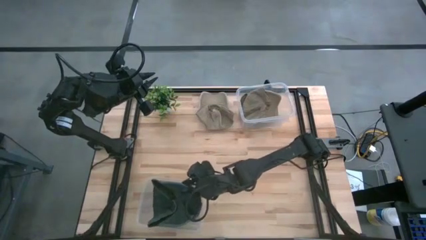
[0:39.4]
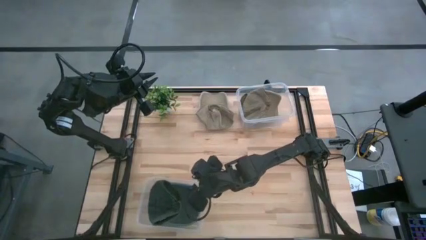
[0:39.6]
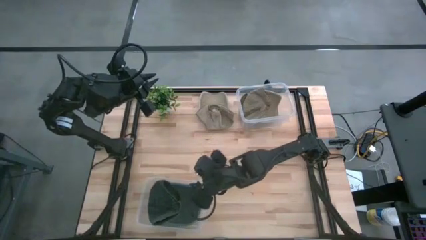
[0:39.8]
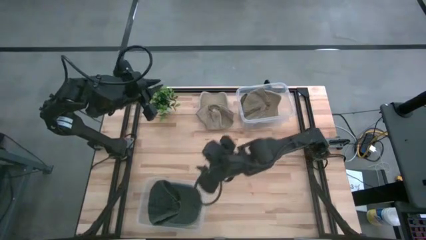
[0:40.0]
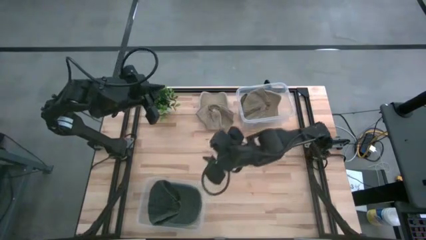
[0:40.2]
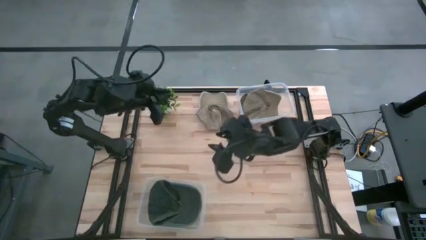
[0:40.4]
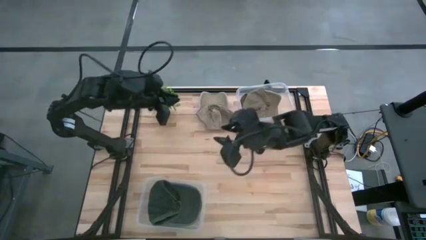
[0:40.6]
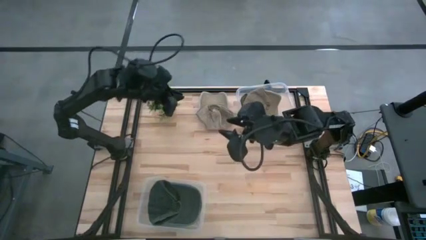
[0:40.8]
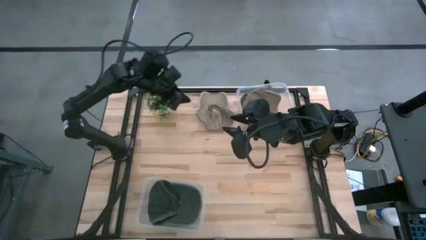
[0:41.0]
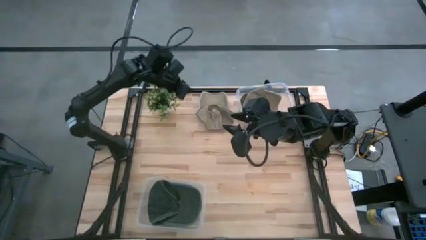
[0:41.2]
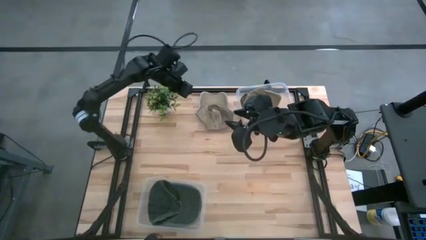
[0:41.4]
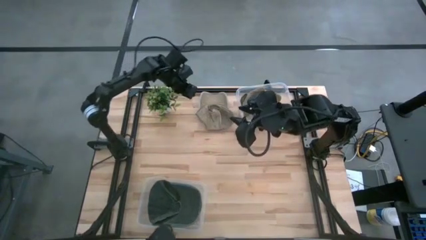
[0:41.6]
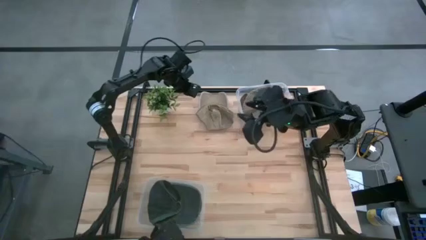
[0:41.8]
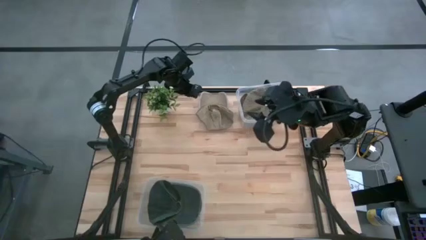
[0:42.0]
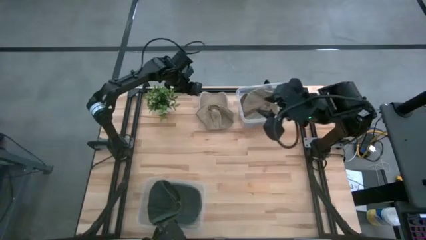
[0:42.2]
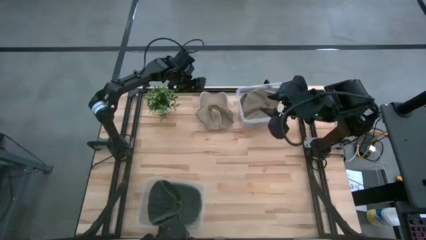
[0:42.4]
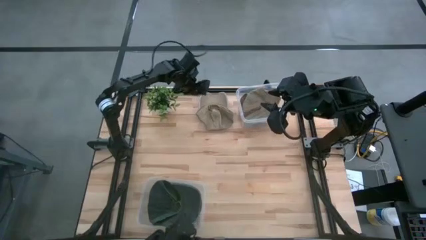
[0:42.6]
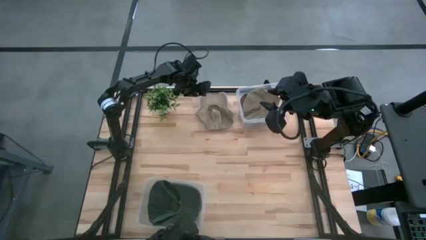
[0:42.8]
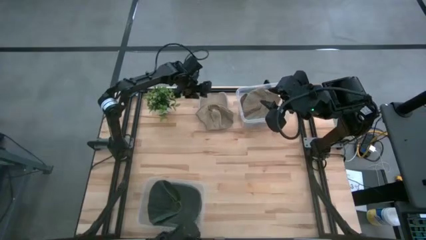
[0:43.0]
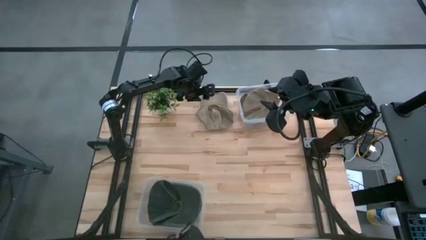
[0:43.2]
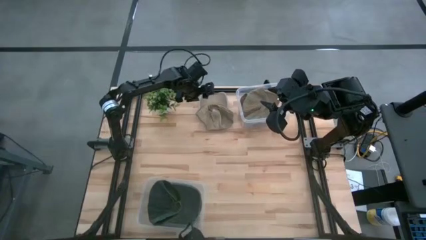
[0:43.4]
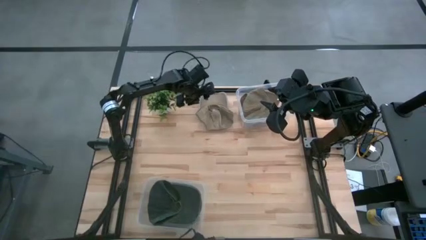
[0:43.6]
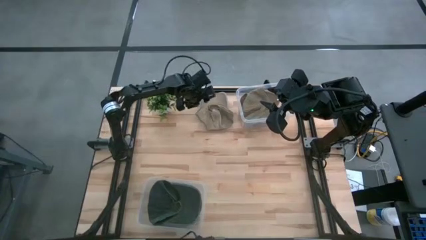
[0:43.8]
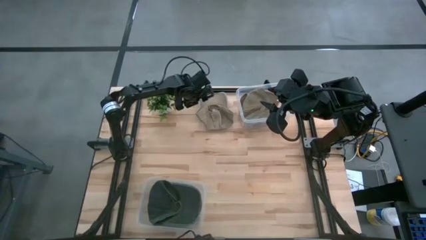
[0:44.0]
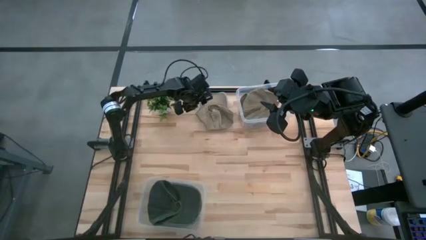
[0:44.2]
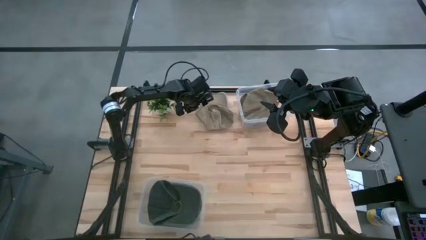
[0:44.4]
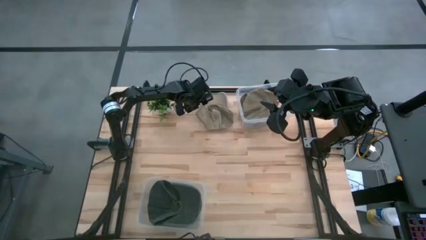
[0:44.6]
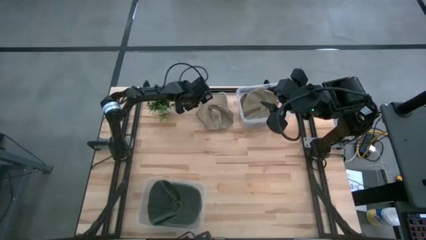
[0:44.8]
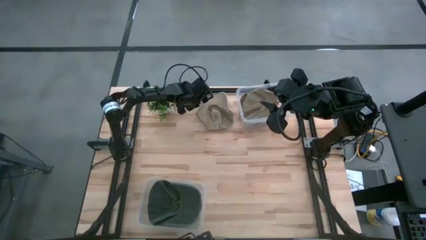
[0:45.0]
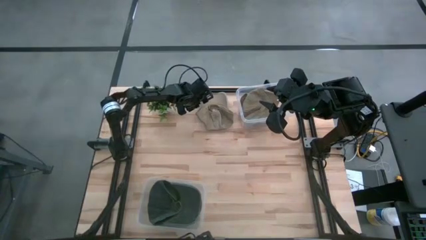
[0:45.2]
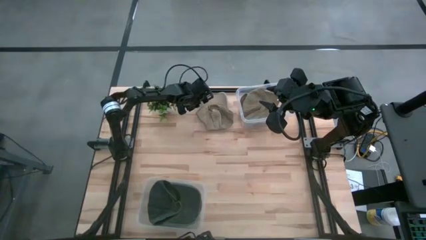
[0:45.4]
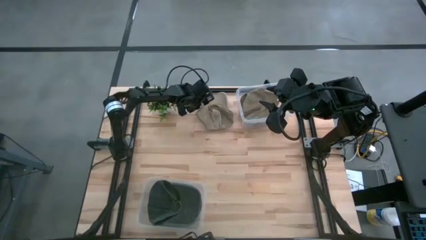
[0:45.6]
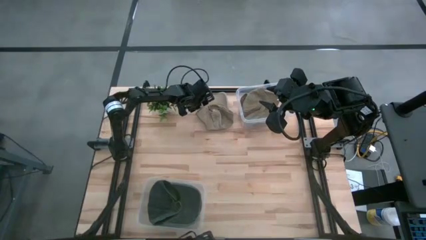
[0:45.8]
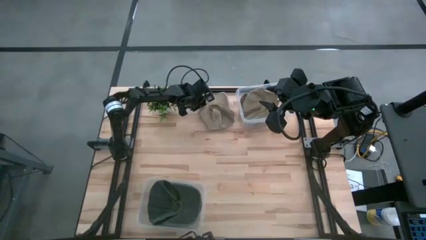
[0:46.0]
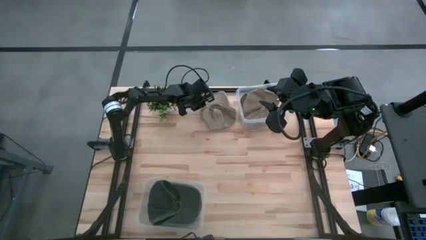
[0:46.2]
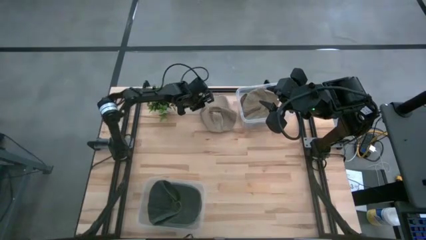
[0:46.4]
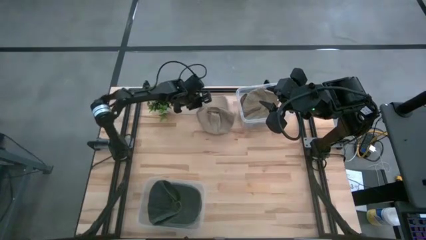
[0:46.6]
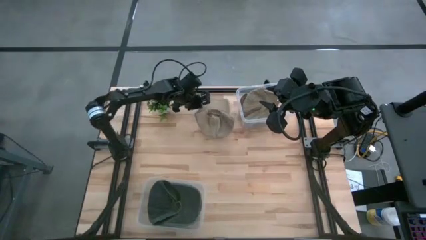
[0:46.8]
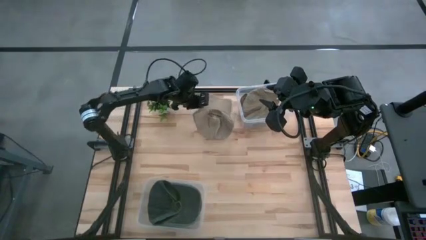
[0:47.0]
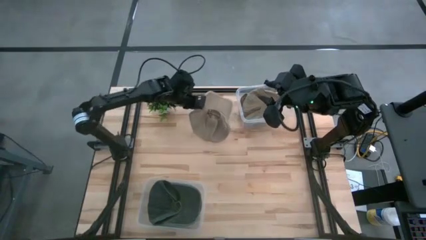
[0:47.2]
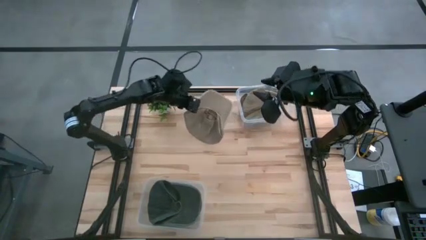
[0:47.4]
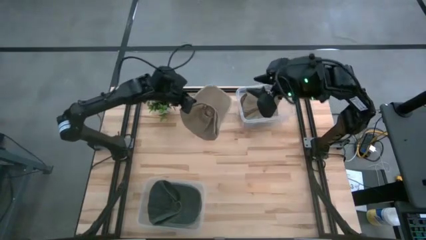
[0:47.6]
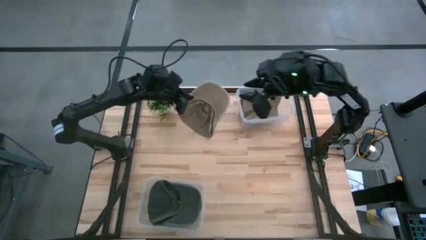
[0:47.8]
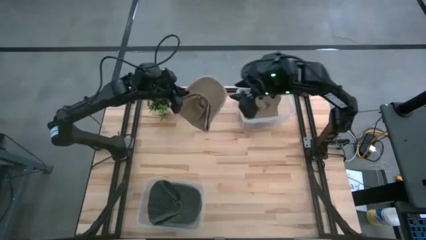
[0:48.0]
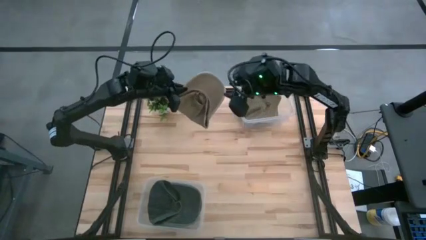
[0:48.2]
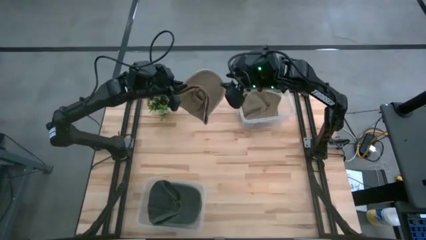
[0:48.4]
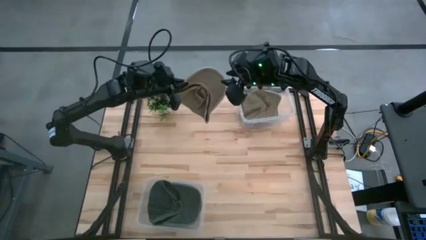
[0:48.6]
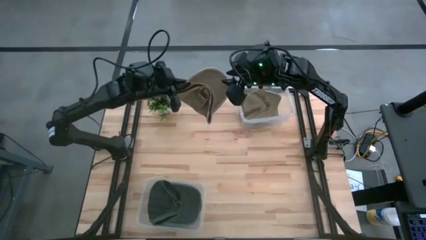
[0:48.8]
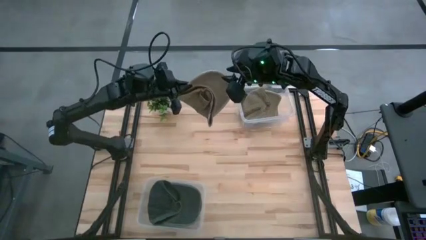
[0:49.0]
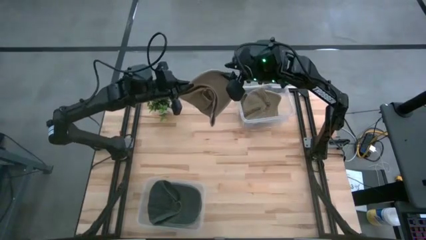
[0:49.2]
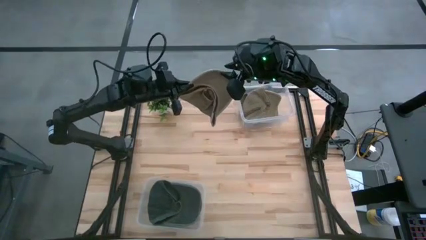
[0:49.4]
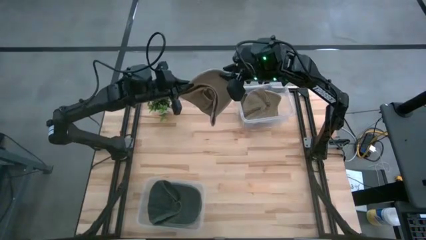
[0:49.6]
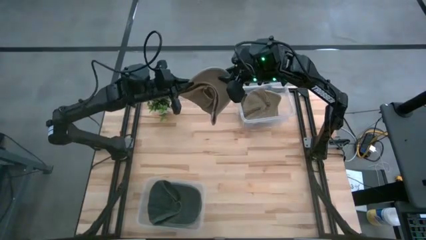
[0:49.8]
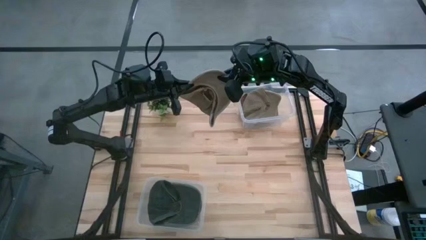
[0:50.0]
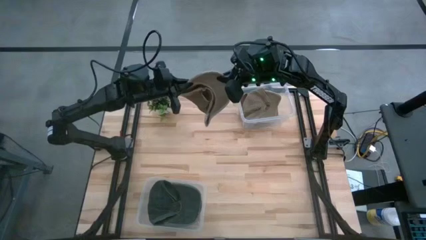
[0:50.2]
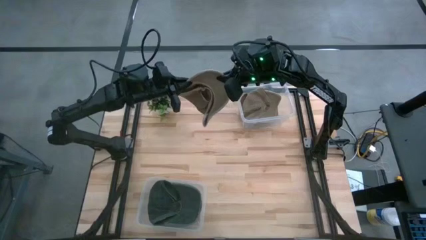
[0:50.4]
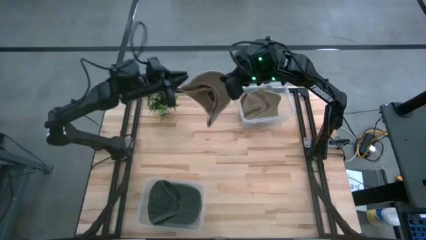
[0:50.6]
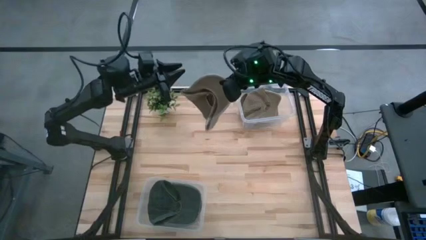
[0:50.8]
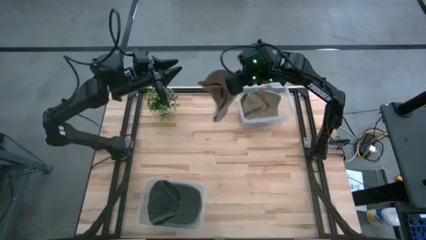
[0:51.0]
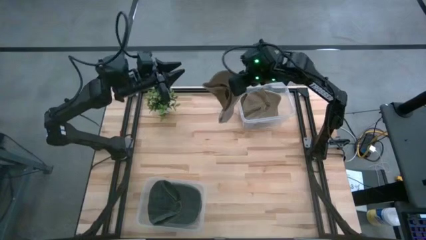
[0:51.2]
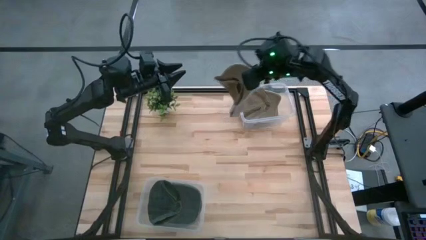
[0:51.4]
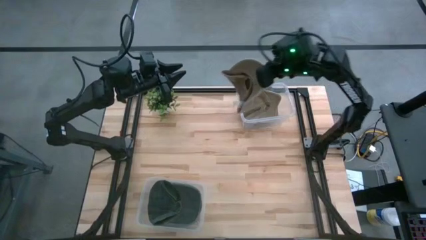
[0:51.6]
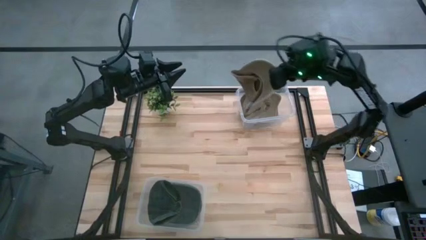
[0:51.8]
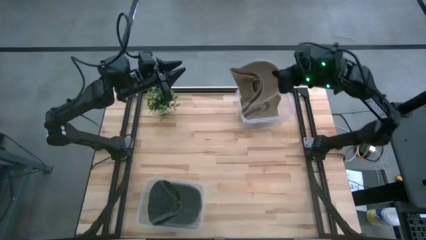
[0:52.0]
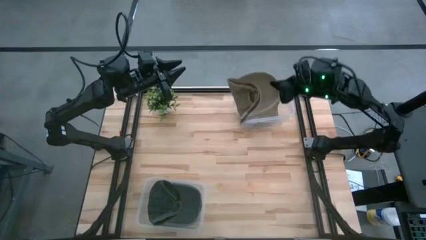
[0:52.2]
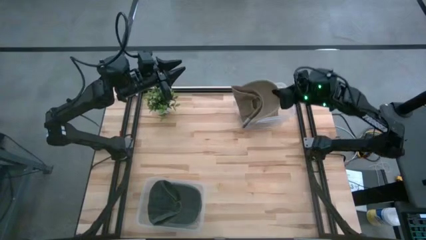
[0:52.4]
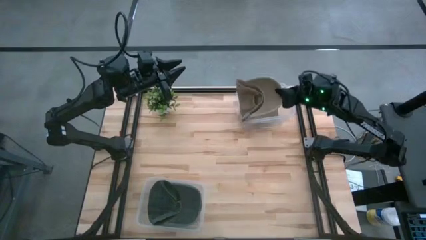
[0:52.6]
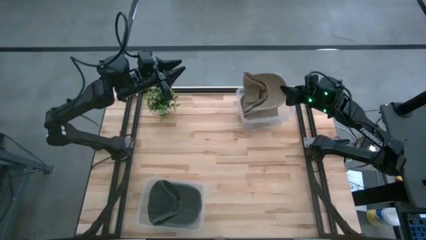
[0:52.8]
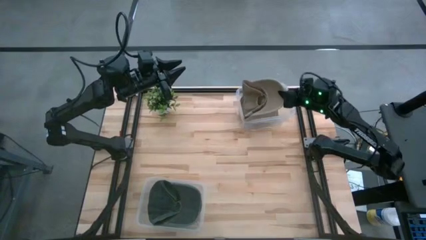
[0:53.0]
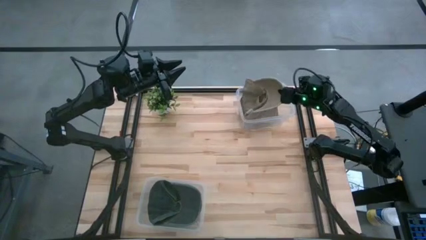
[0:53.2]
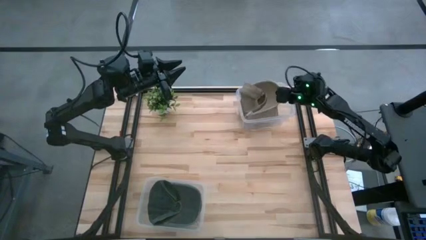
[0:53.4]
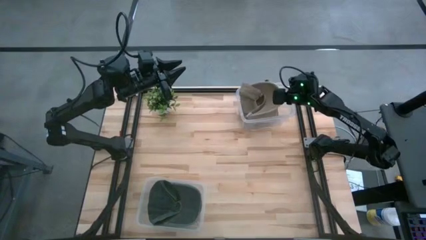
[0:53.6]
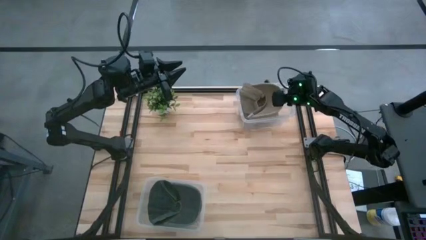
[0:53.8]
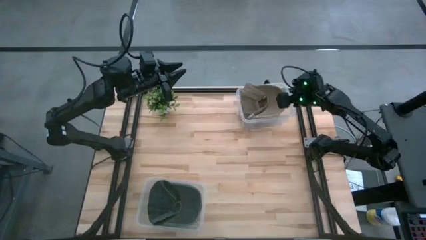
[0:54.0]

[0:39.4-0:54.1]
Task: Pick & Place hat
Put the brown cap into the top transparent bin
